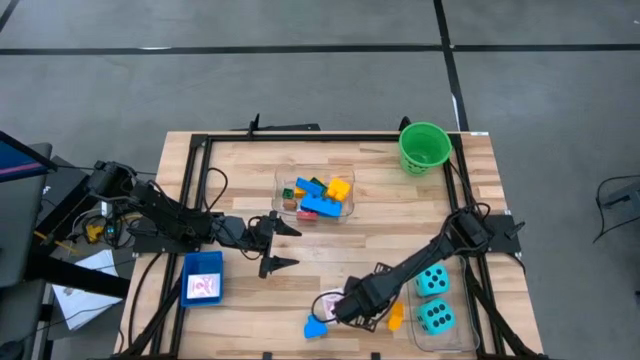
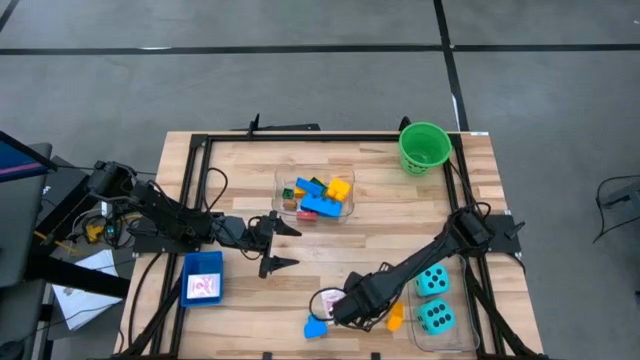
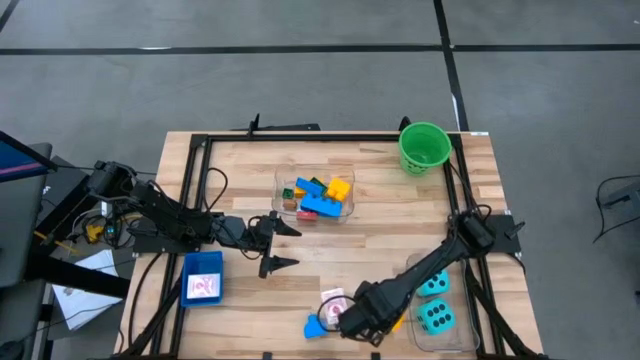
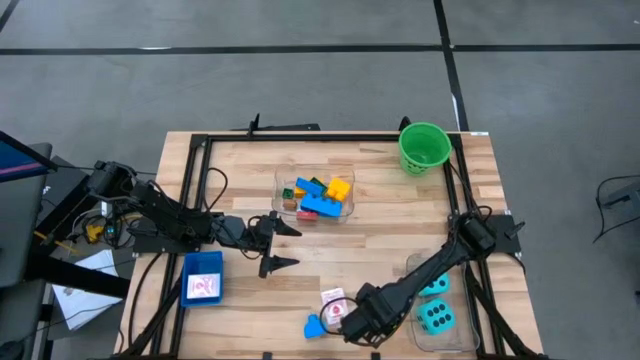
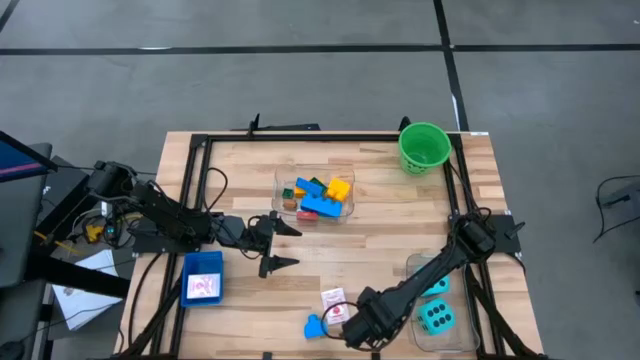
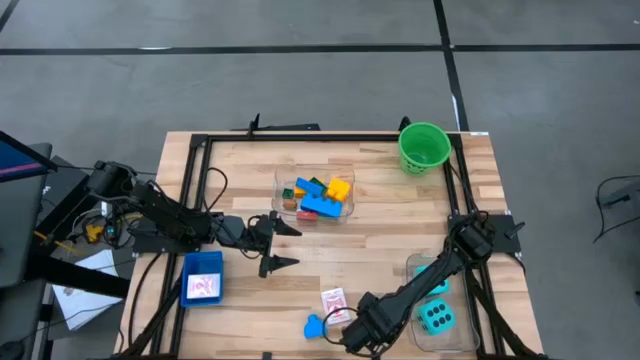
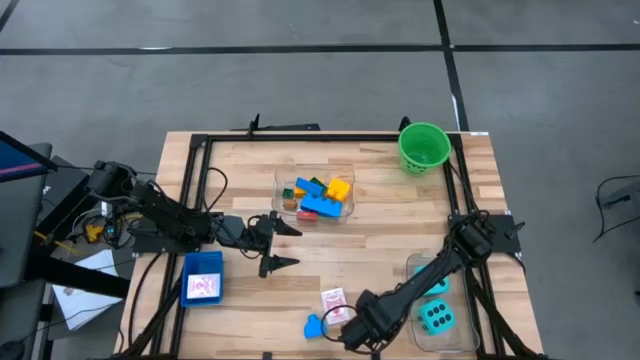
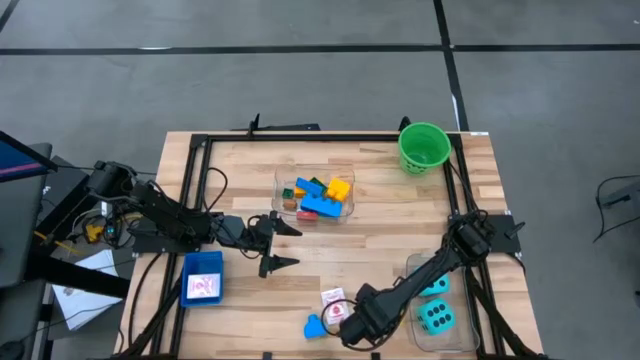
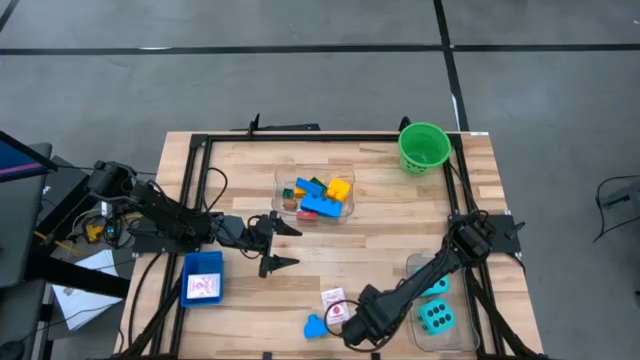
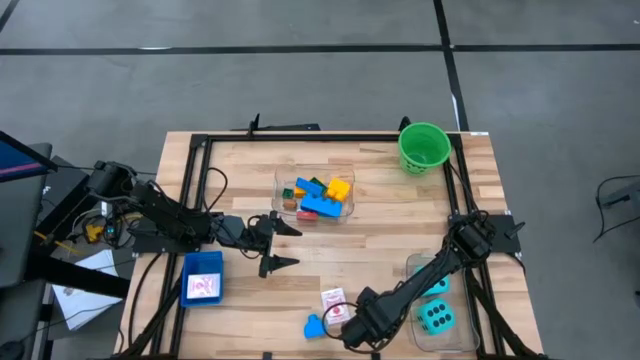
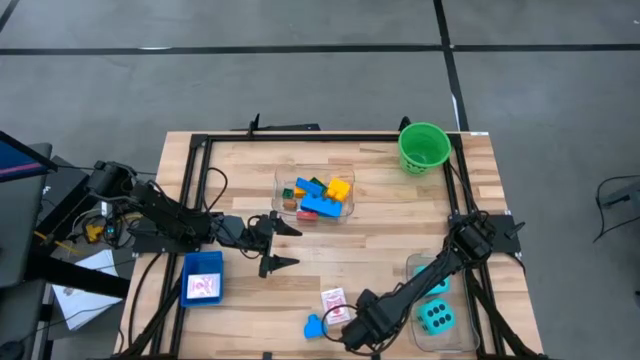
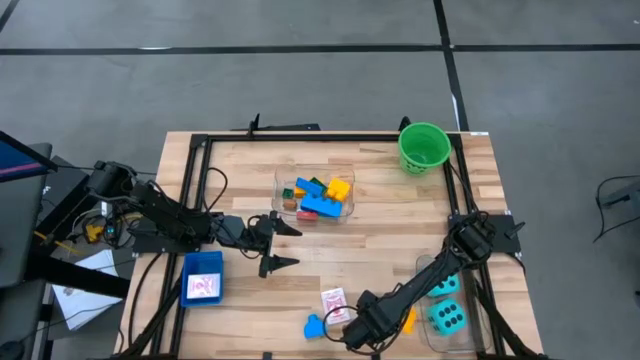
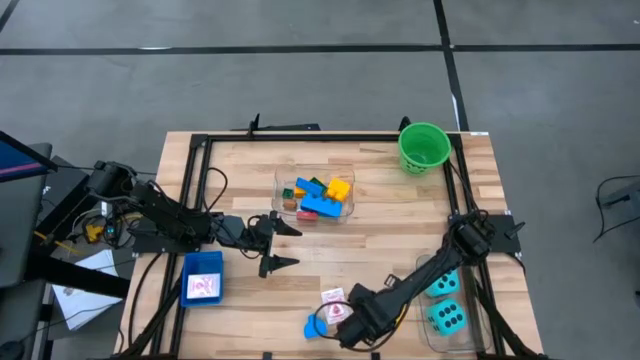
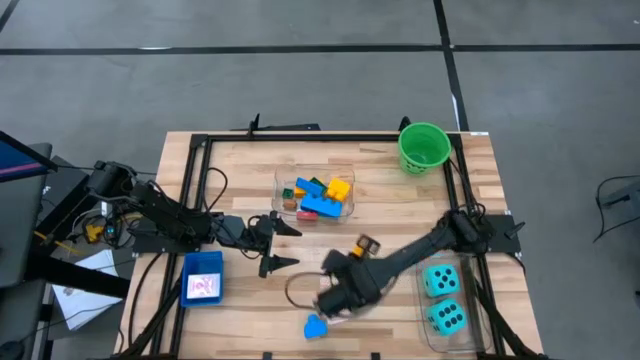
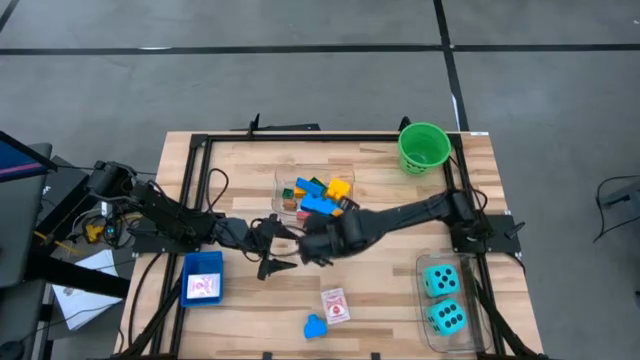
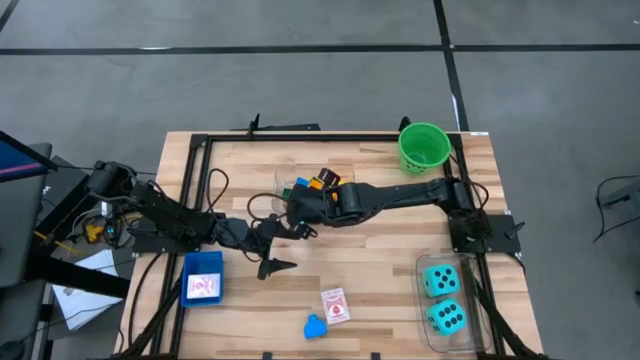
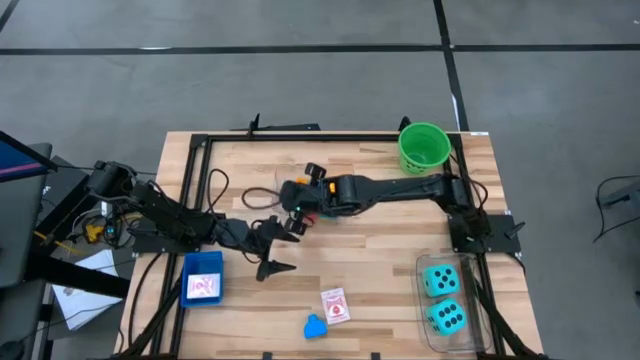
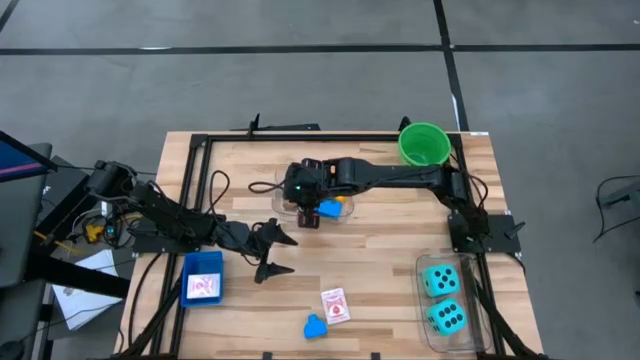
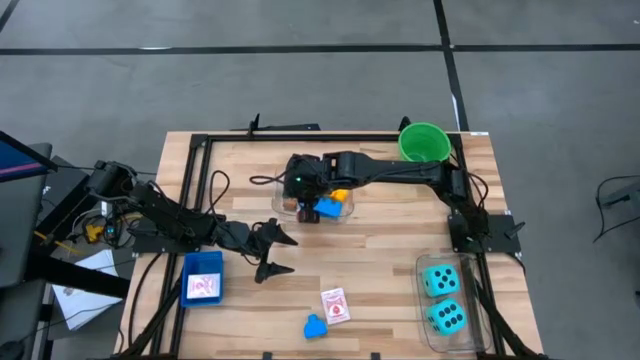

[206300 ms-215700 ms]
Task: Pick & Place Toys
Put the yellow game piece into the top transparent bin

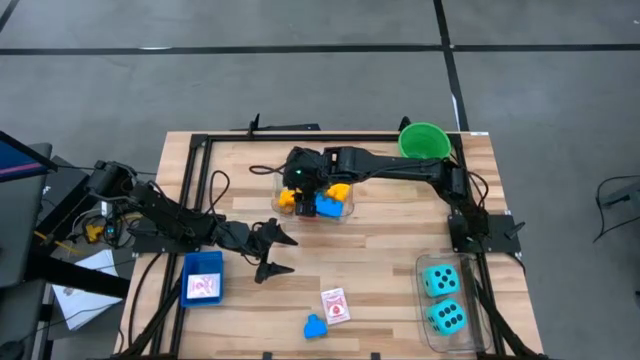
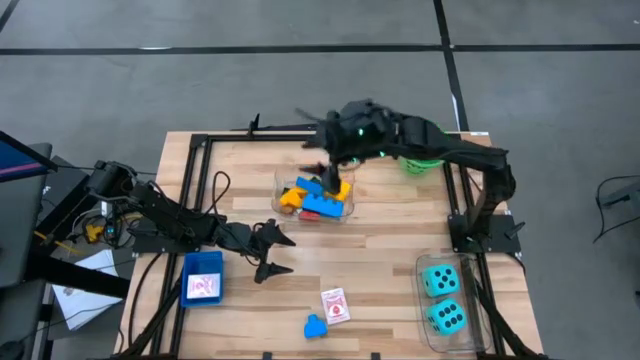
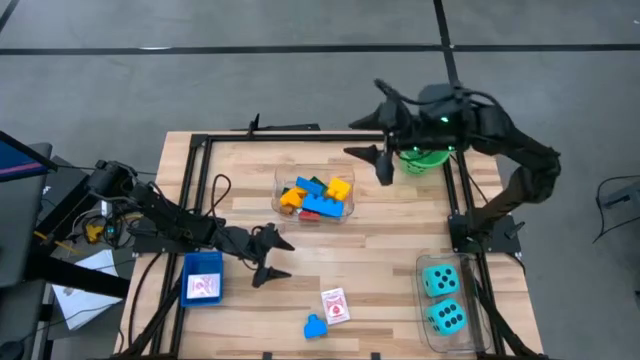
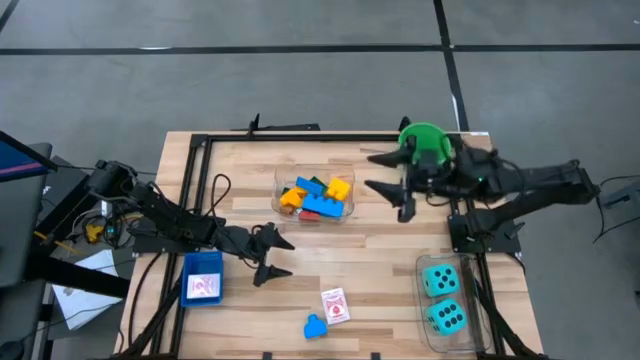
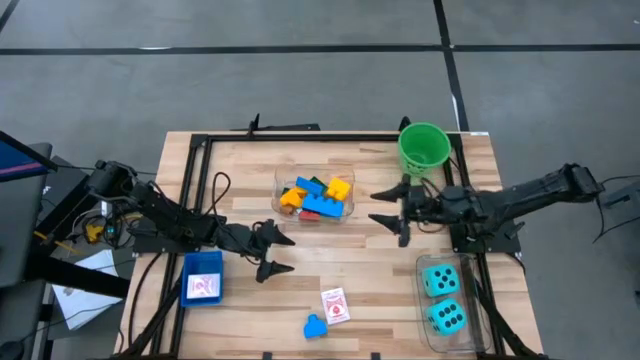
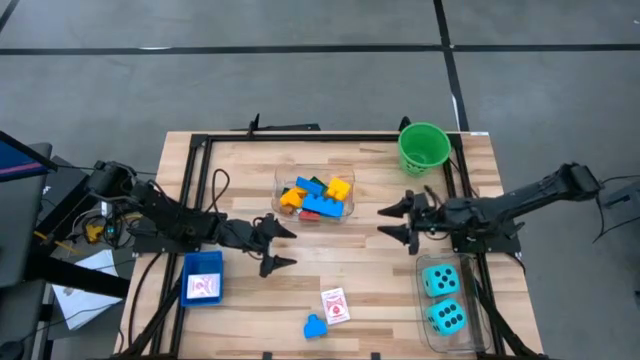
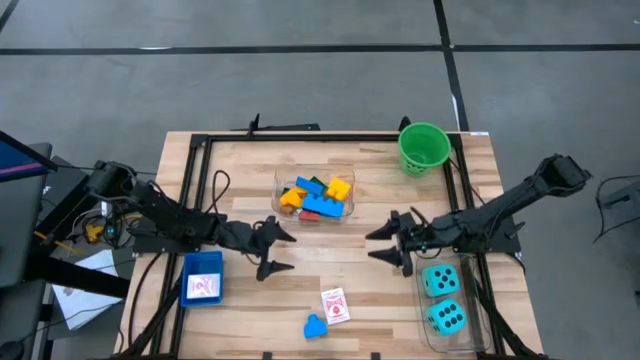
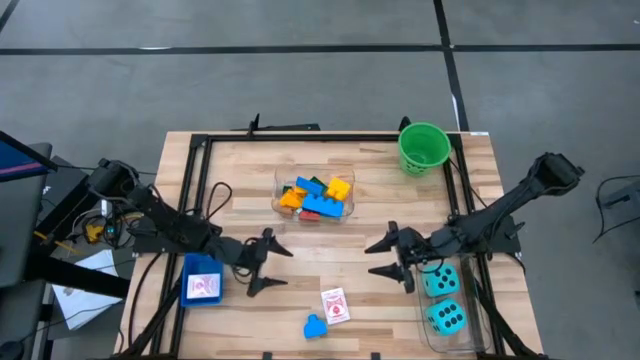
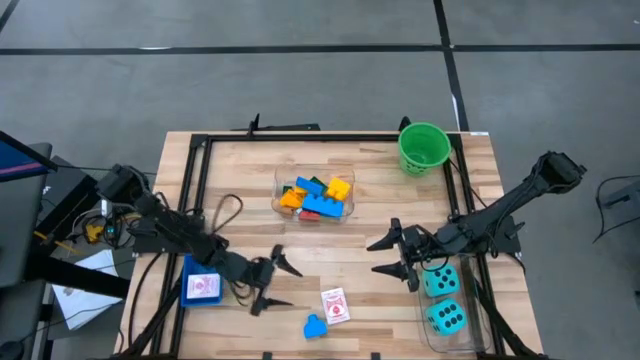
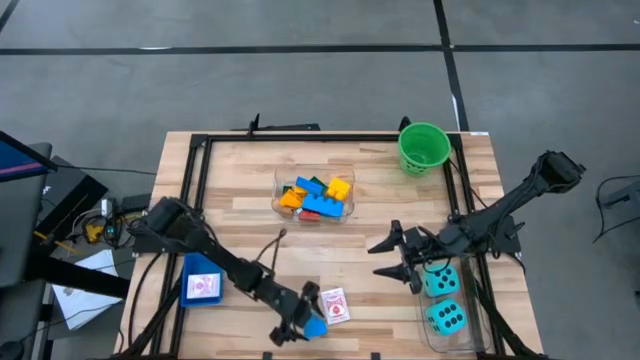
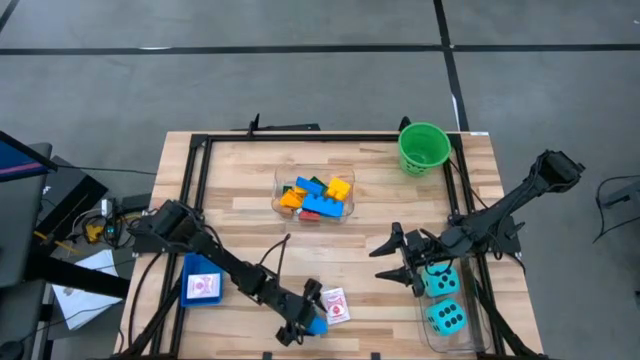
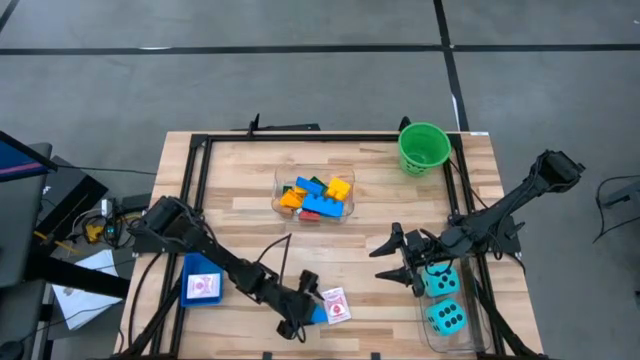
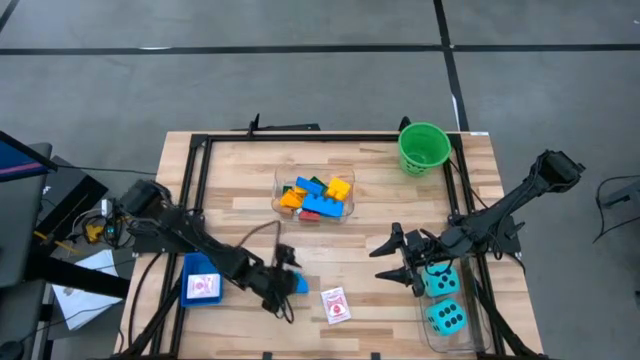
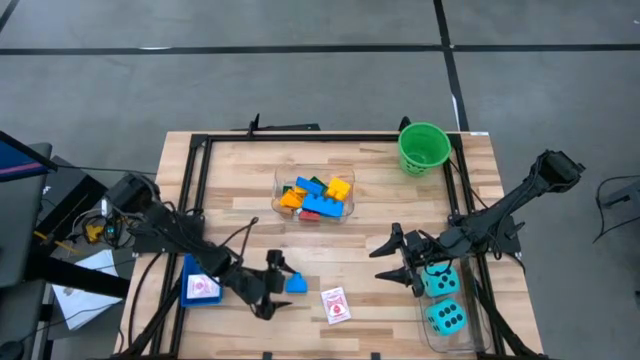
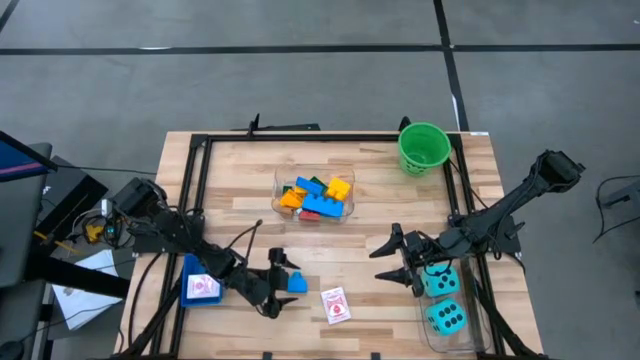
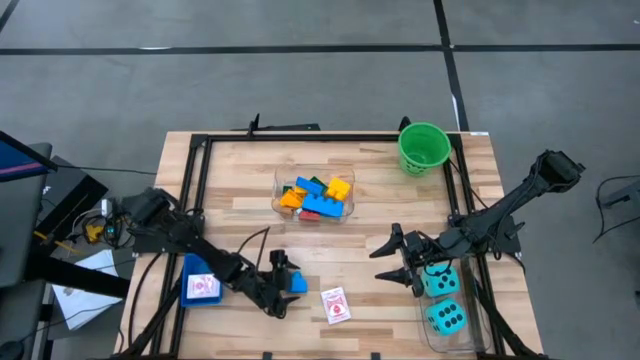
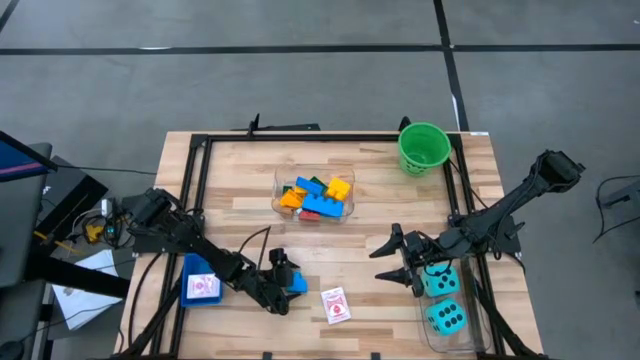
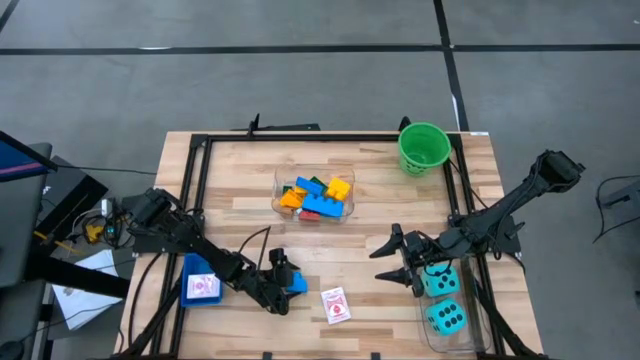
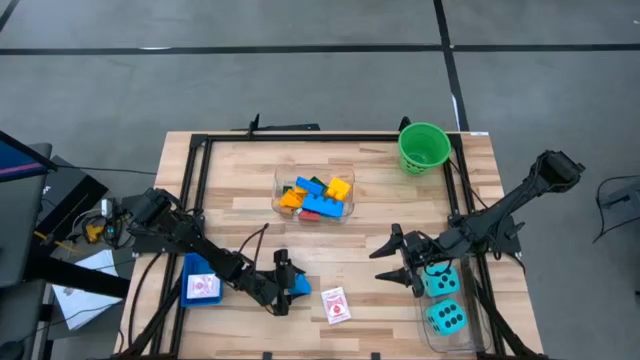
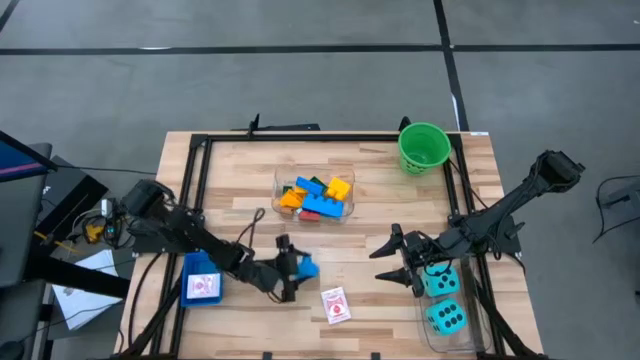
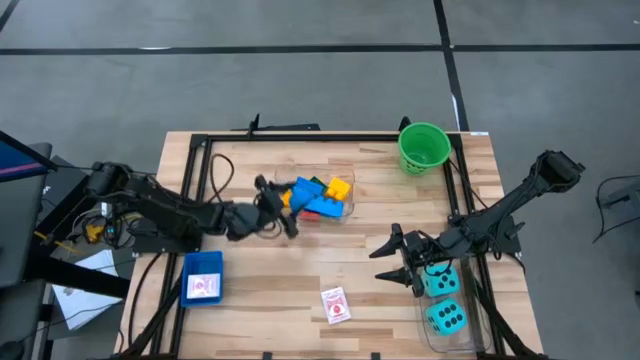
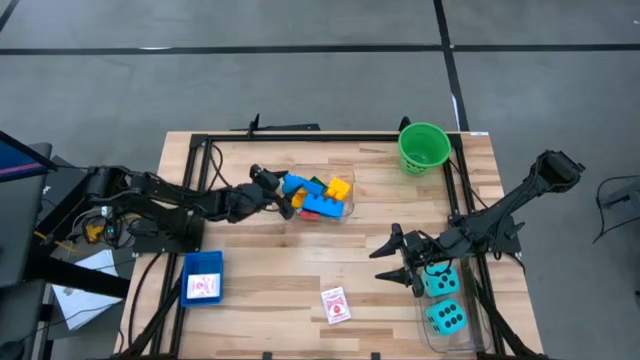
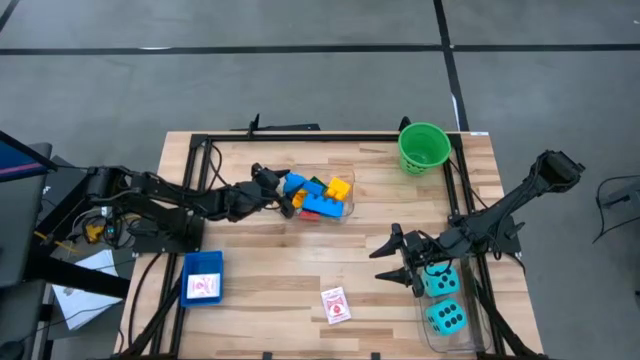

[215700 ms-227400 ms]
Put the blue game piece into the top transparent bin
